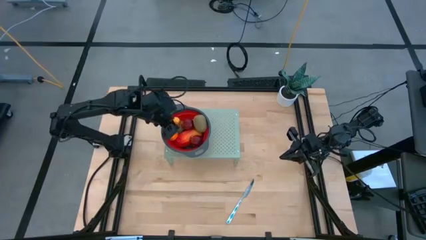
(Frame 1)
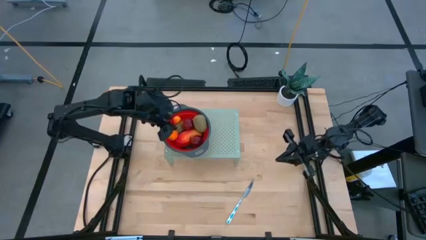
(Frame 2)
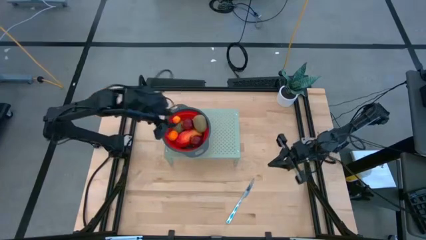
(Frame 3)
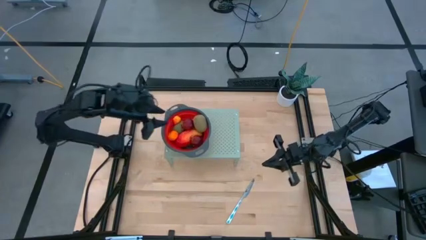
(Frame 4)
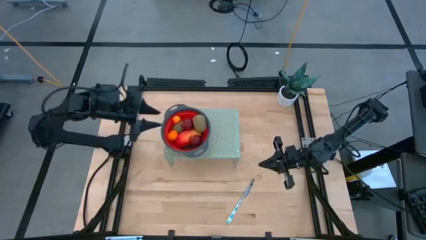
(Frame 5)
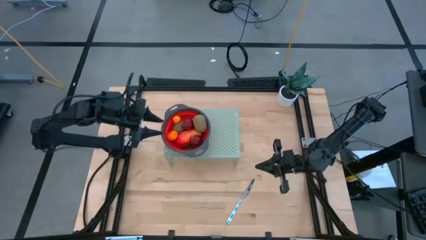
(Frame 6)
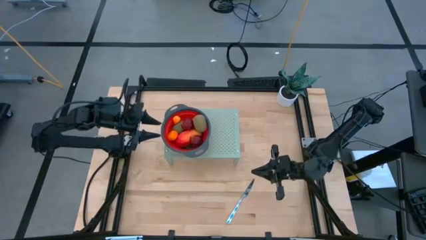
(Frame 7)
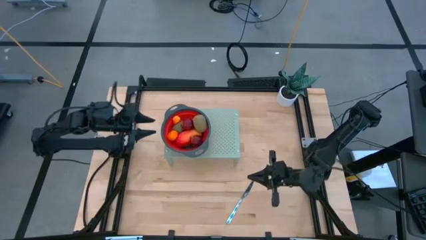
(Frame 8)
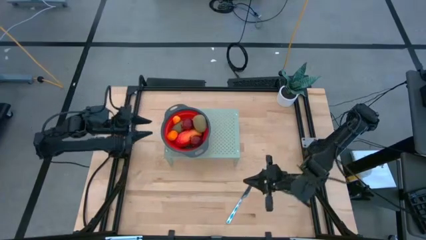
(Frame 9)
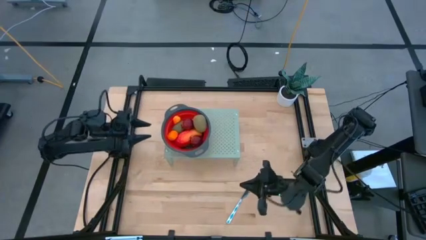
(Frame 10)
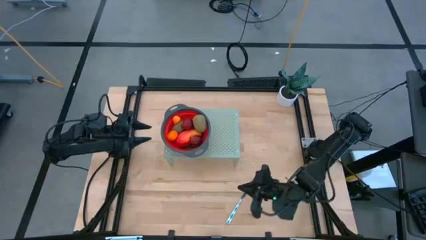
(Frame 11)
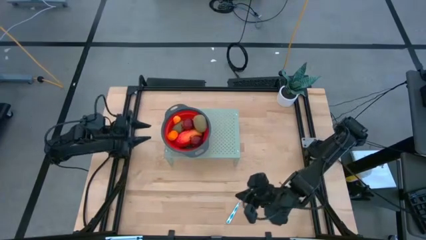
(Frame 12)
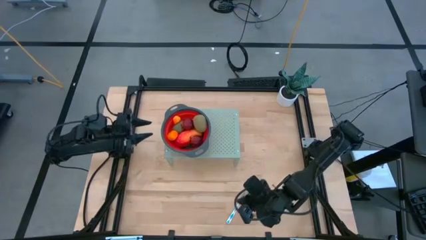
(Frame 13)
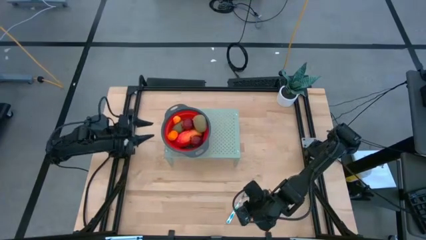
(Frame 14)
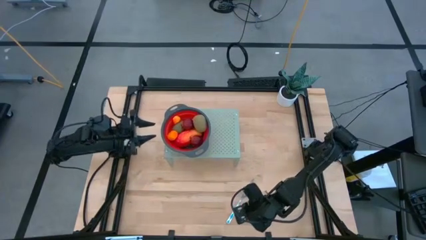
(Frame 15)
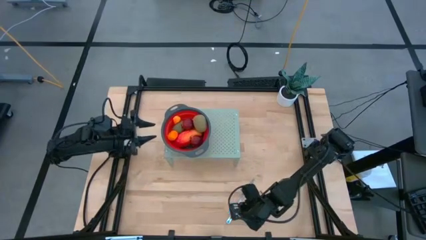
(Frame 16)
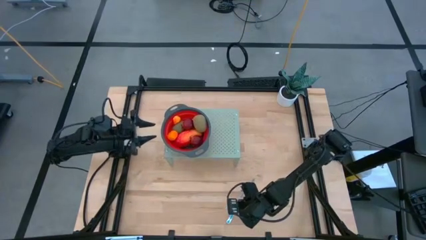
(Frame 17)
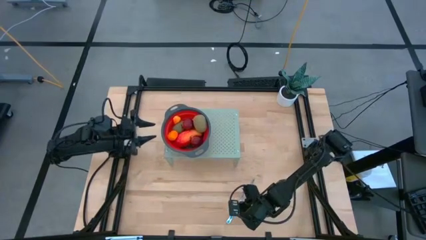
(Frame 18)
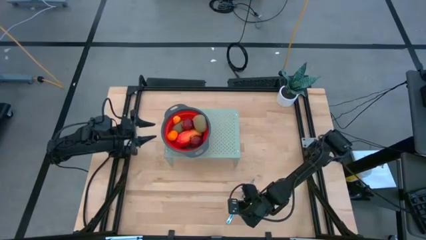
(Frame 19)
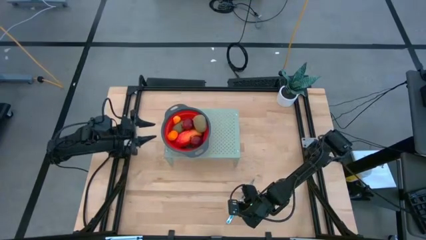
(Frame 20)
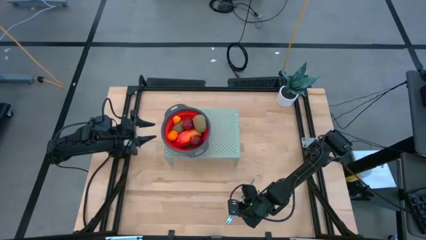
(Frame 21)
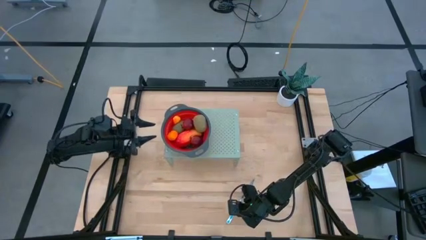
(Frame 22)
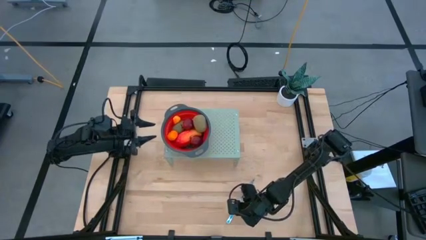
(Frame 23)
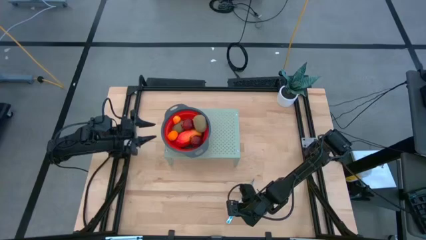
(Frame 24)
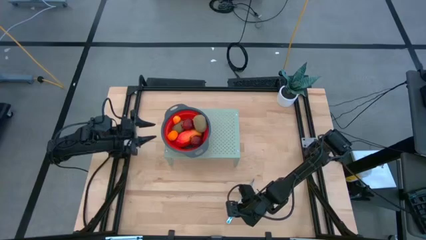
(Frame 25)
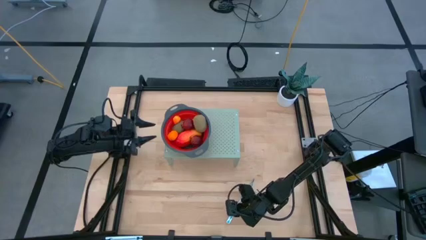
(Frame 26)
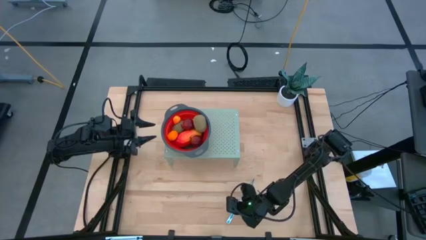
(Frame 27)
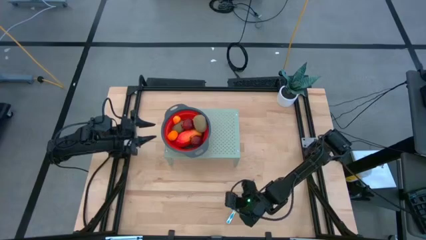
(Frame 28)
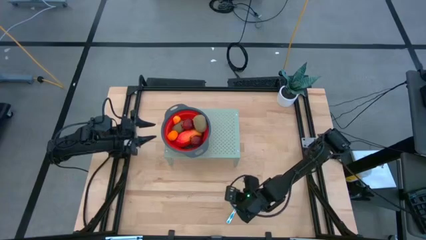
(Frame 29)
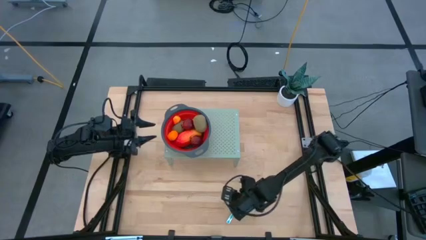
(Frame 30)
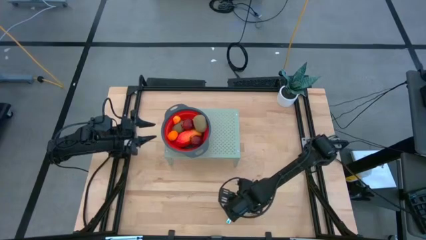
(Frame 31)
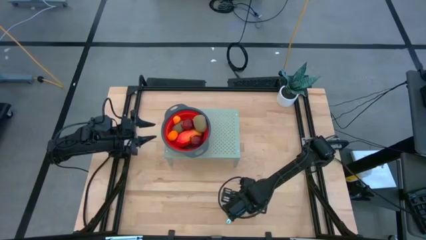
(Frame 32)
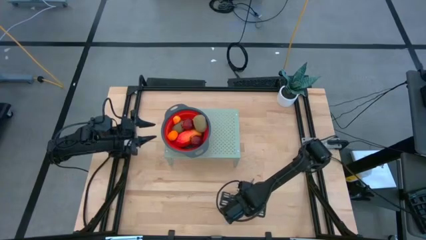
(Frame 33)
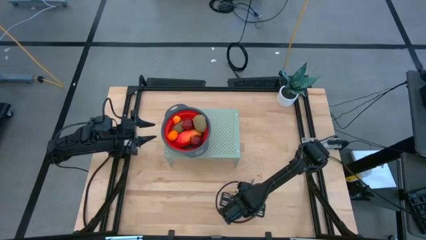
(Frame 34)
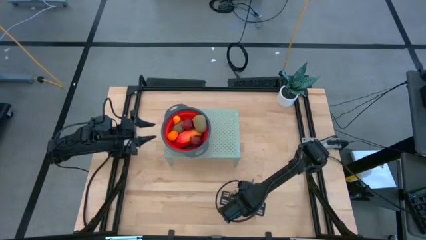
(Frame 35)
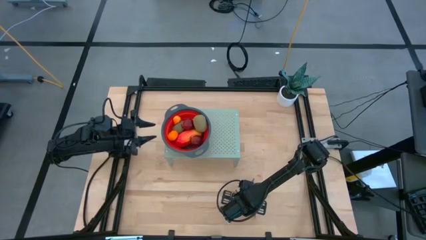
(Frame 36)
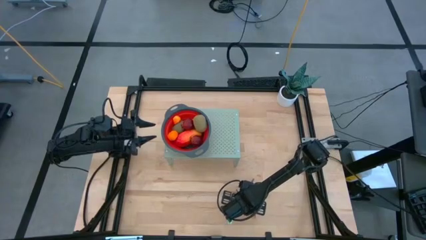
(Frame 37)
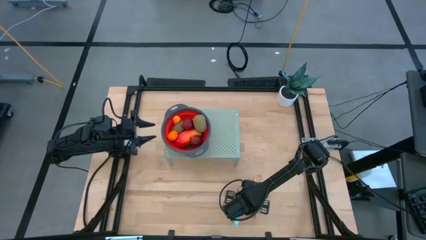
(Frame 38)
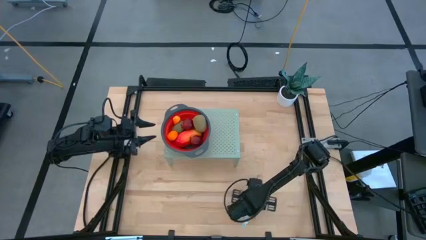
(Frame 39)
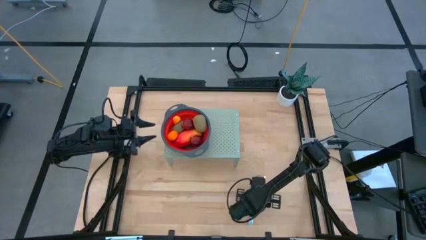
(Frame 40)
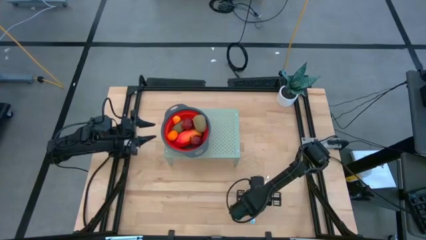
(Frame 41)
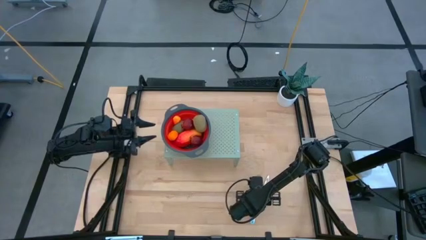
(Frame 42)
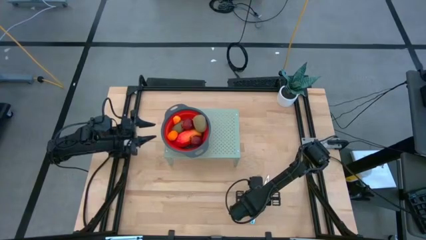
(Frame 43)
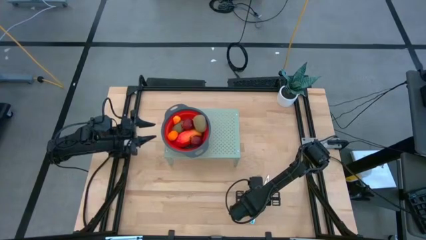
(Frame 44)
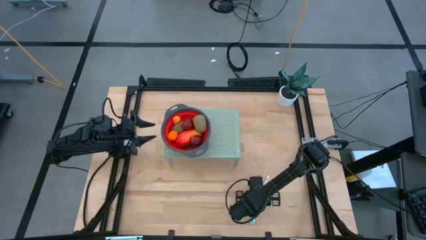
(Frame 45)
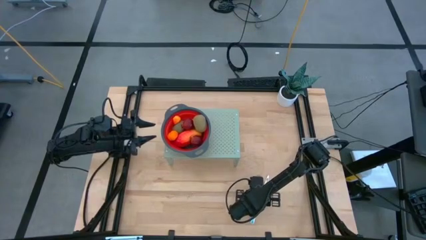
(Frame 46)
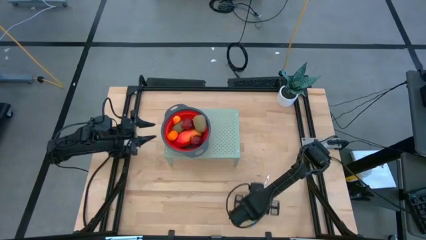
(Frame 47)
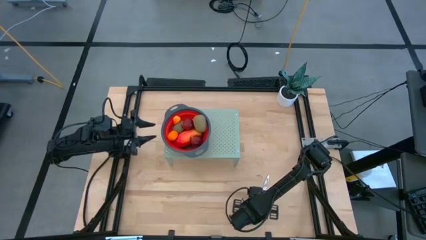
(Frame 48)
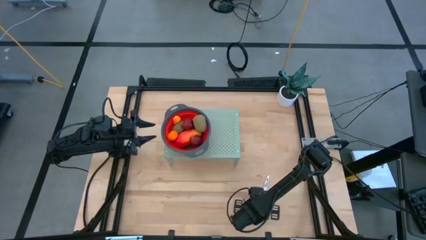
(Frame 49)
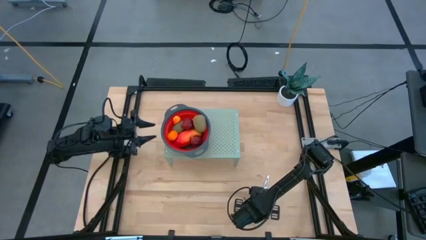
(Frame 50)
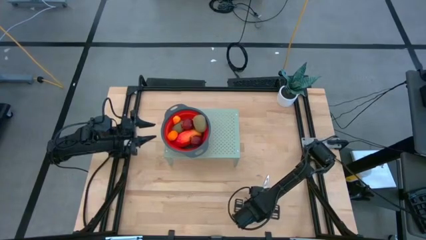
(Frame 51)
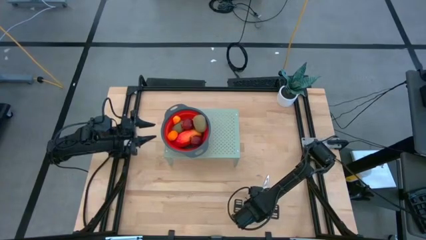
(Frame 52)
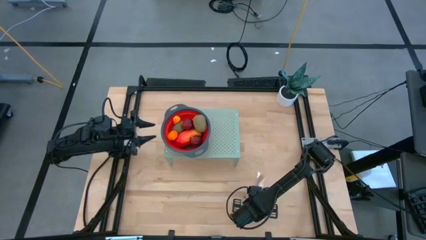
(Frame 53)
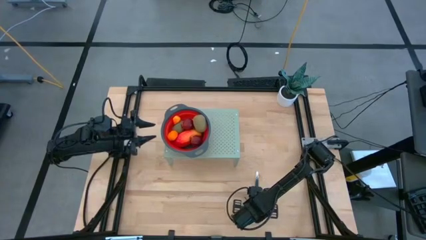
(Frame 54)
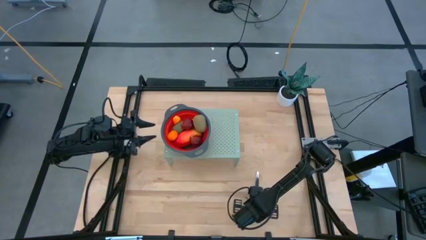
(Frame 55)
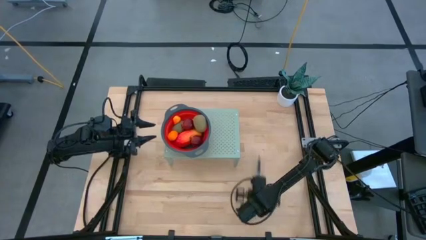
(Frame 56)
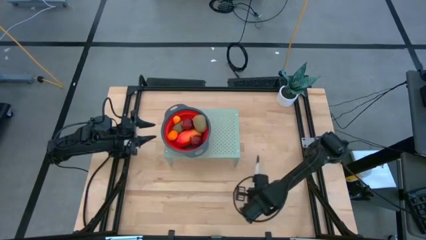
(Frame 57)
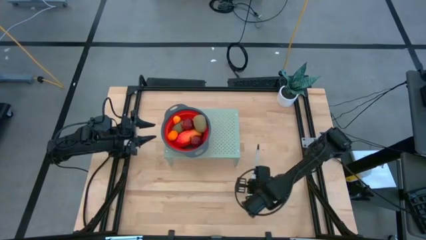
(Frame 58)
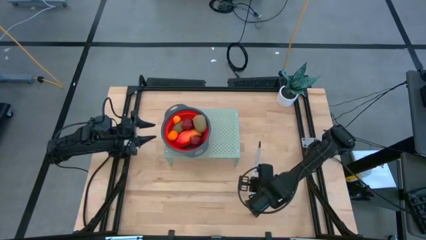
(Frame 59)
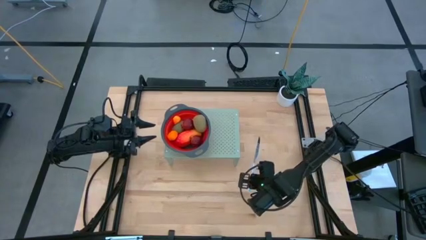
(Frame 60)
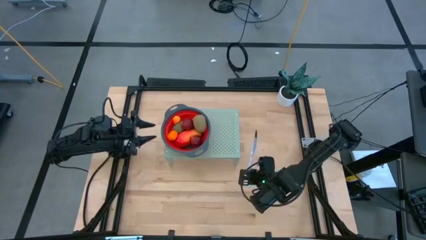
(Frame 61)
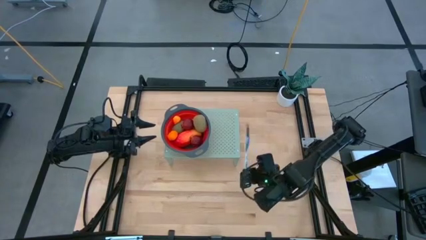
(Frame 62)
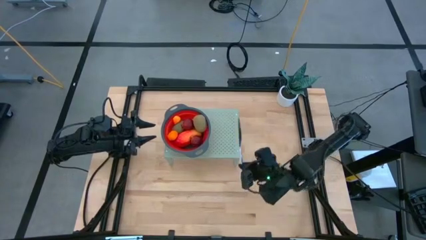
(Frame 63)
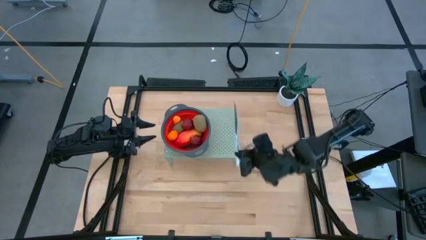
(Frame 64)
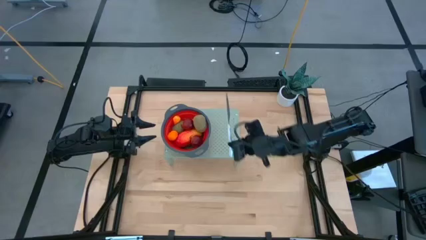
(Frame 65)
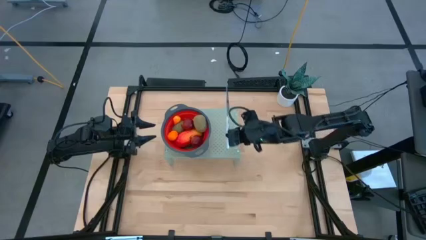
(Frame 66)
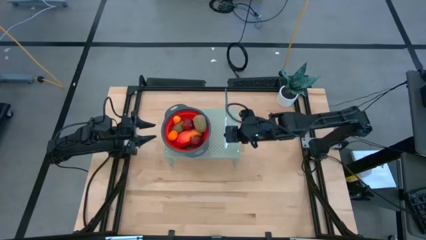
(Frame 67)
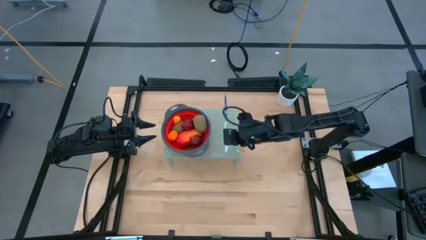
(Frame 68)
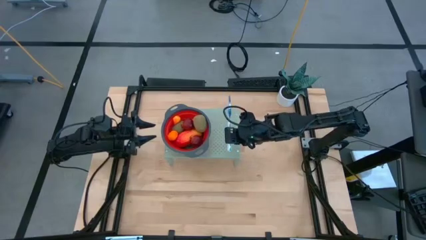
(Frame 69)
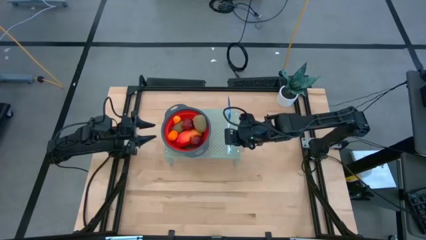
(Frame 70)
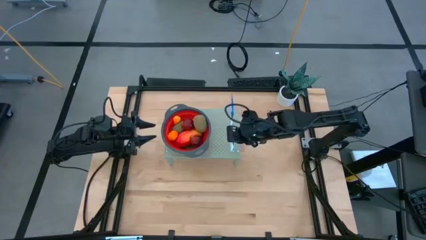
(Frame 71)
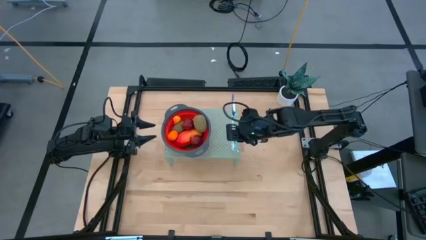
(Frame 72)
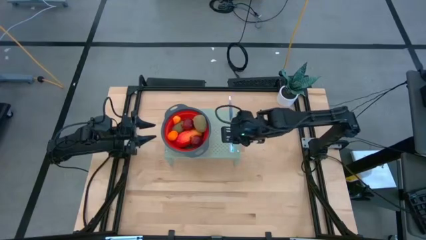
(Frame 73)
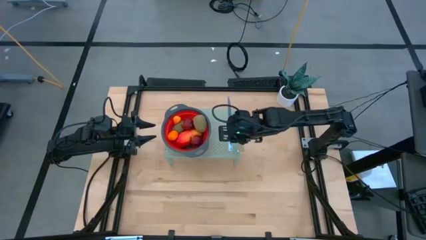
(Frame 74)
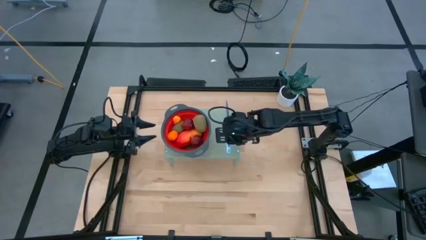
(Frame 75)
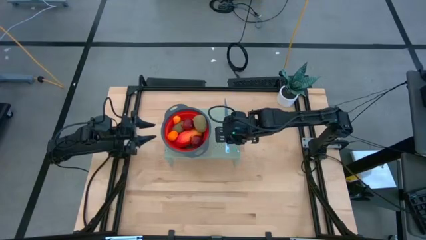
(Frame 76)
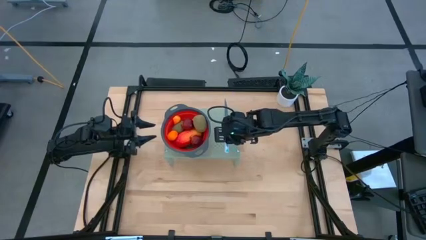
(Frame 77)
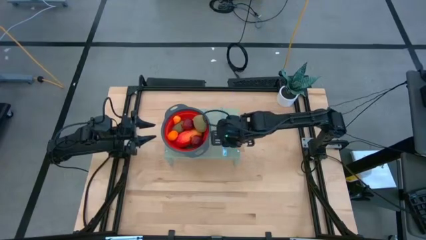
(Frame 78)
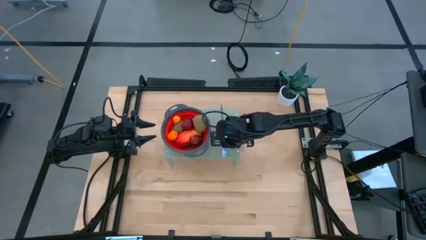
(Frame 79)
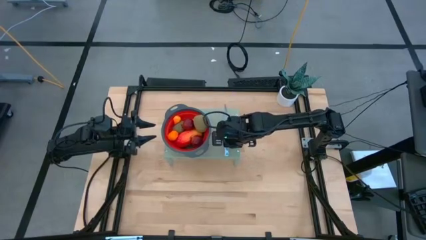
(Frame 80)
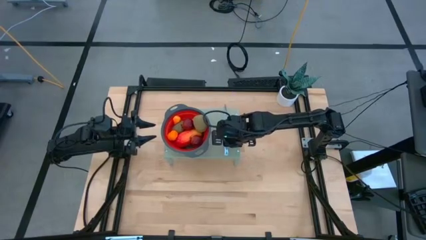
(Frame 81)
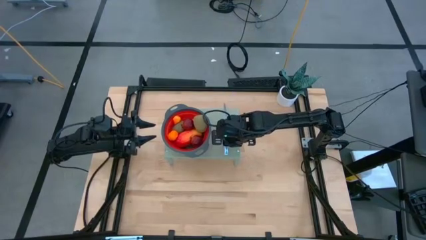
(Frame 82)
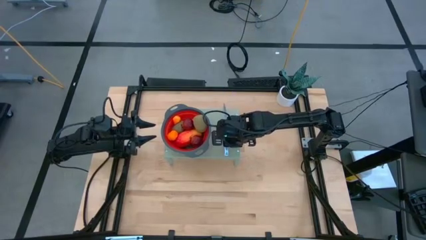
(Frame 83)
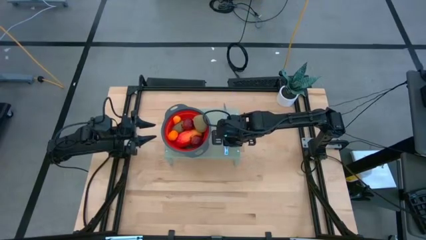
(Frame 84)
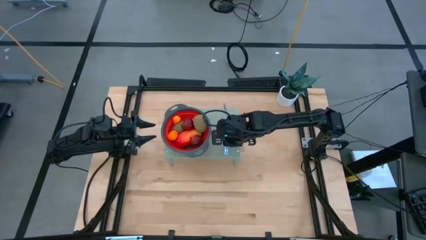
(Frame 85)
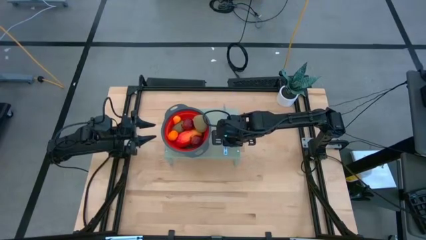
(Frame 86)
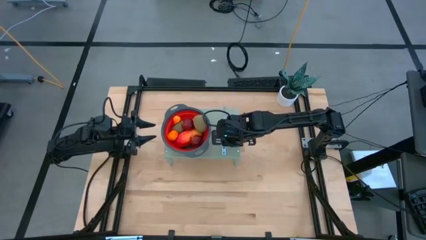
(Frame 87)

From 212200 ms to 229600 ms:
Task: Pick & Place Fruit
Put the blue patterned bread knife on the shelf
